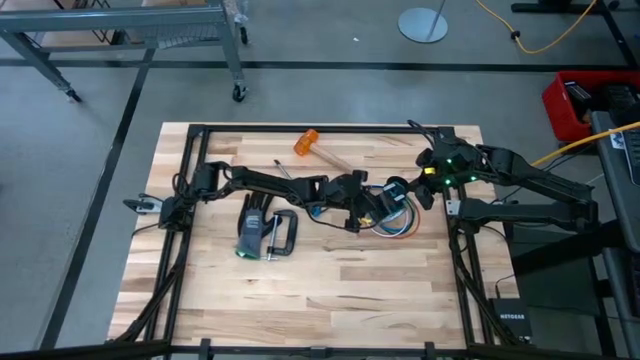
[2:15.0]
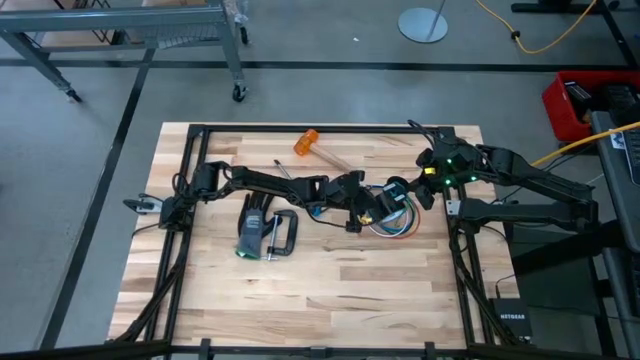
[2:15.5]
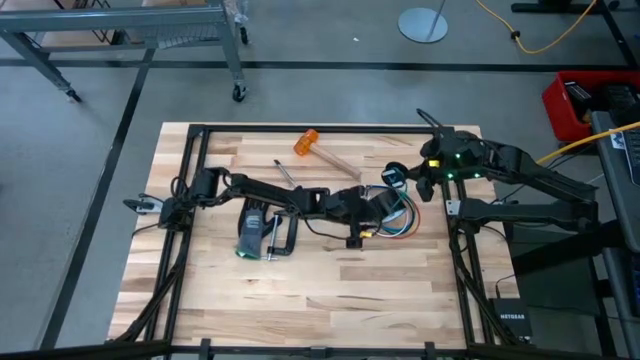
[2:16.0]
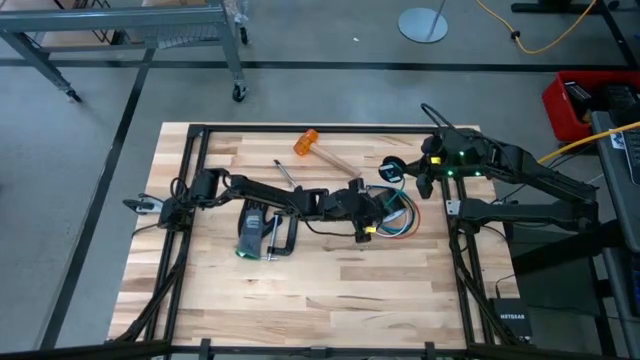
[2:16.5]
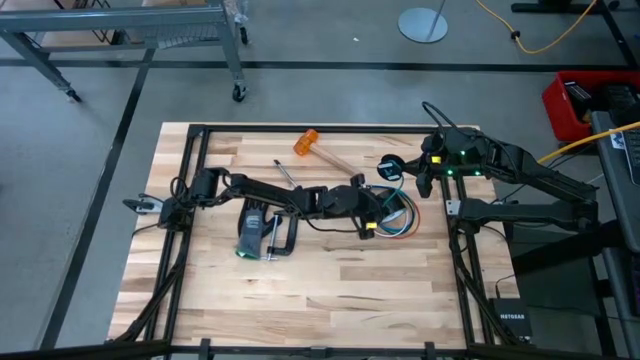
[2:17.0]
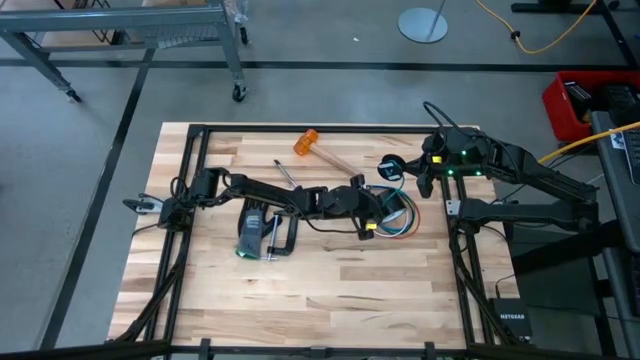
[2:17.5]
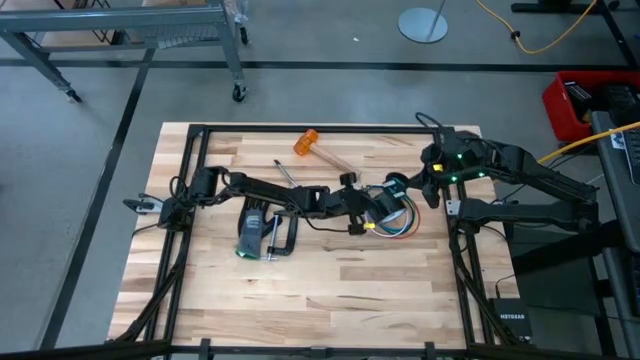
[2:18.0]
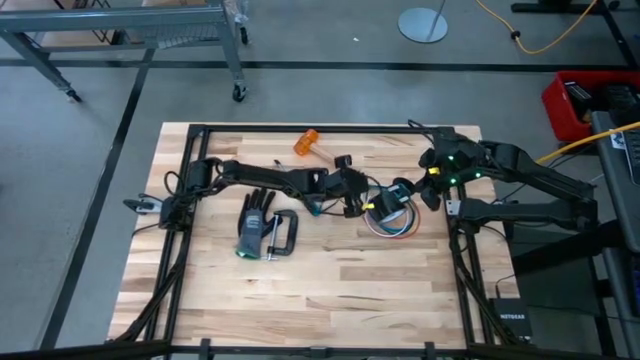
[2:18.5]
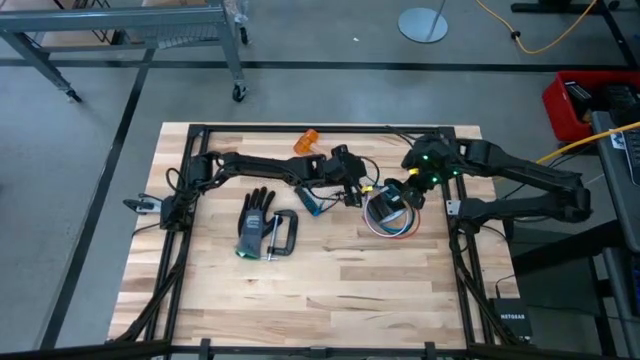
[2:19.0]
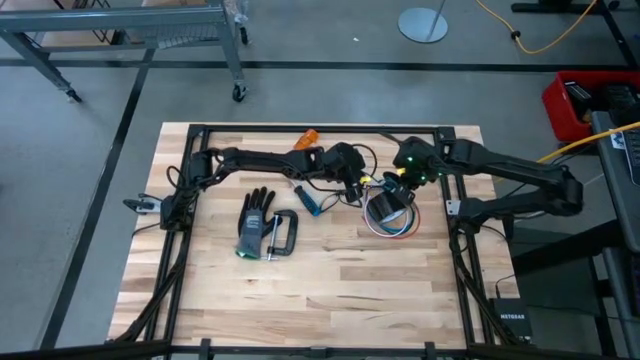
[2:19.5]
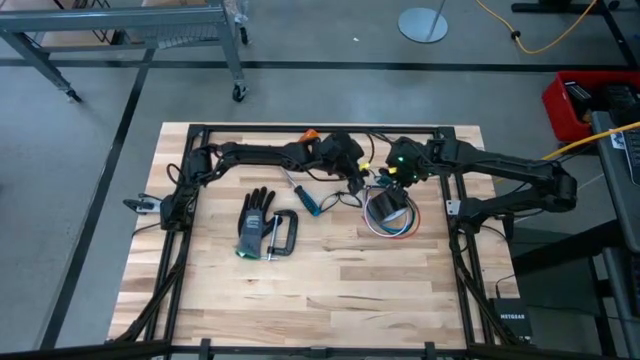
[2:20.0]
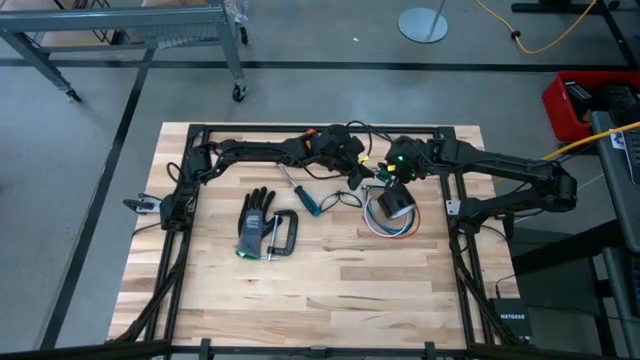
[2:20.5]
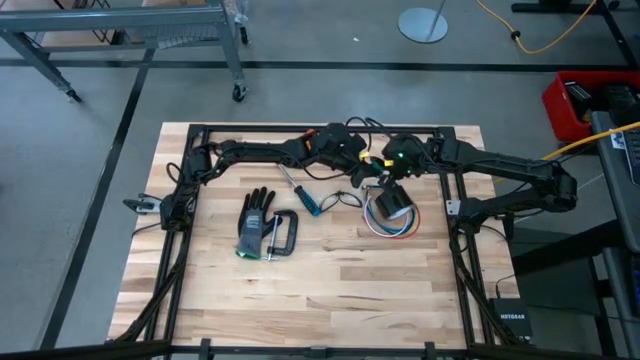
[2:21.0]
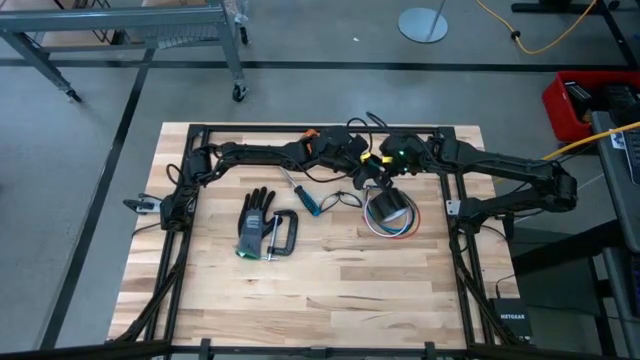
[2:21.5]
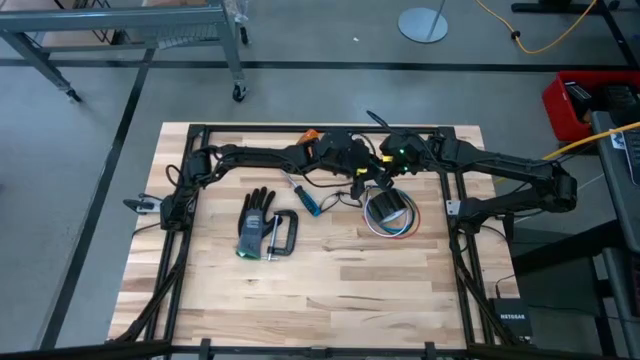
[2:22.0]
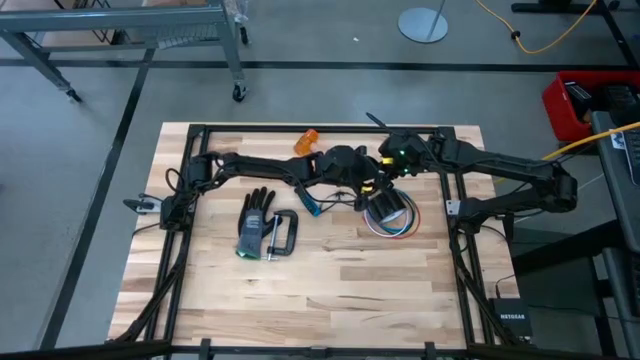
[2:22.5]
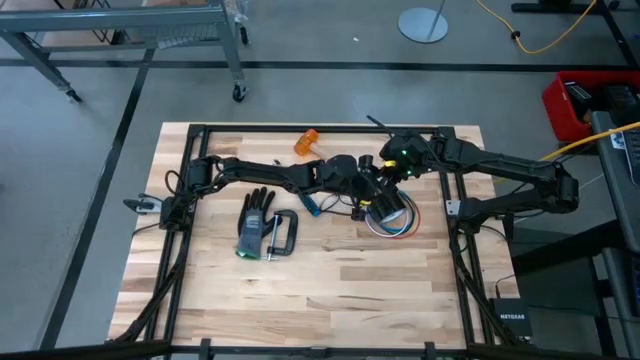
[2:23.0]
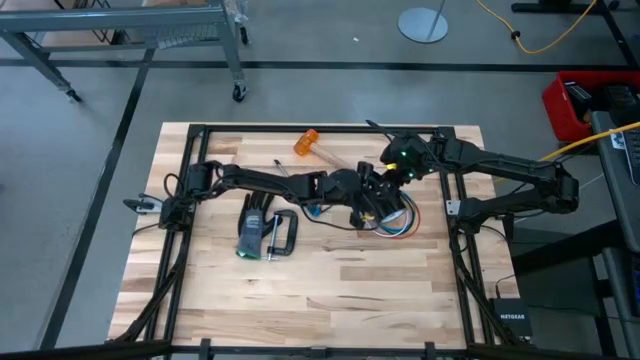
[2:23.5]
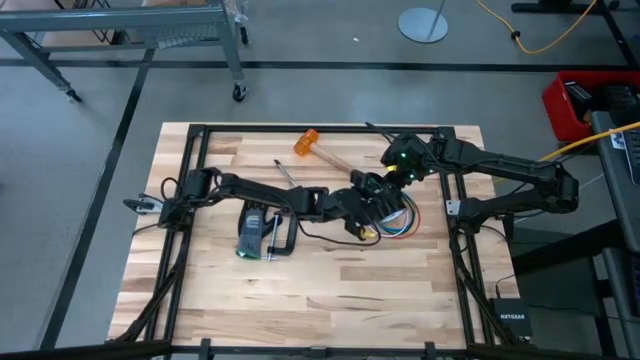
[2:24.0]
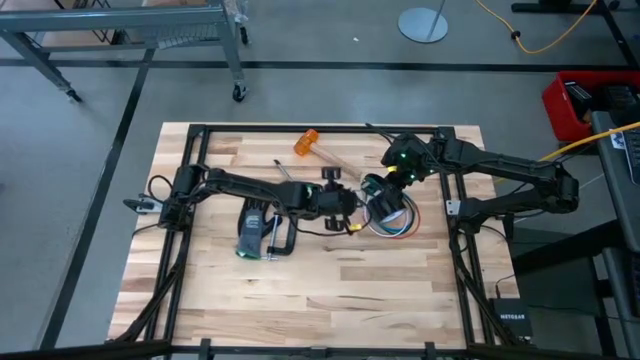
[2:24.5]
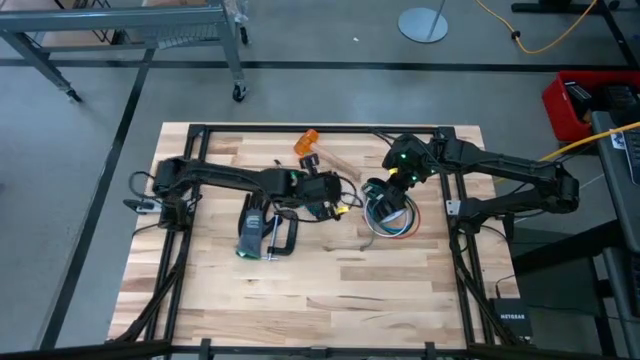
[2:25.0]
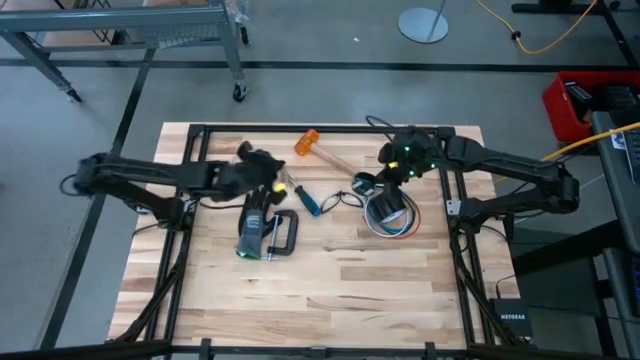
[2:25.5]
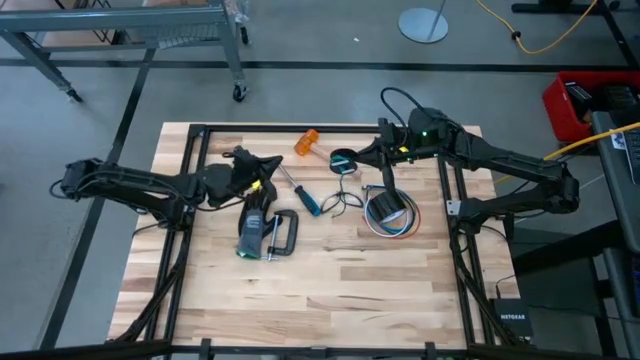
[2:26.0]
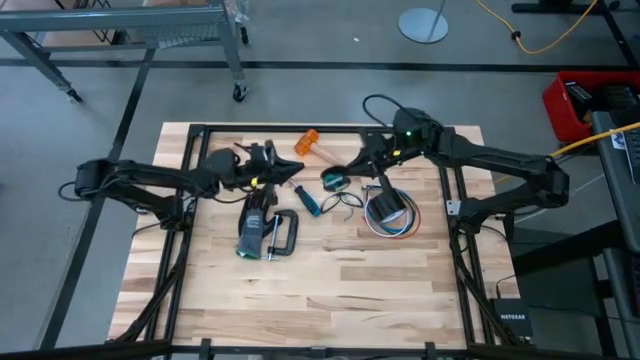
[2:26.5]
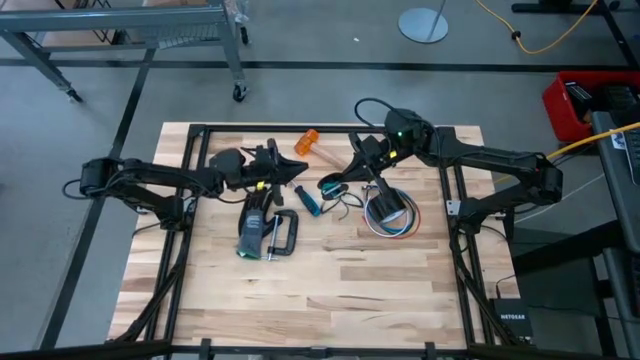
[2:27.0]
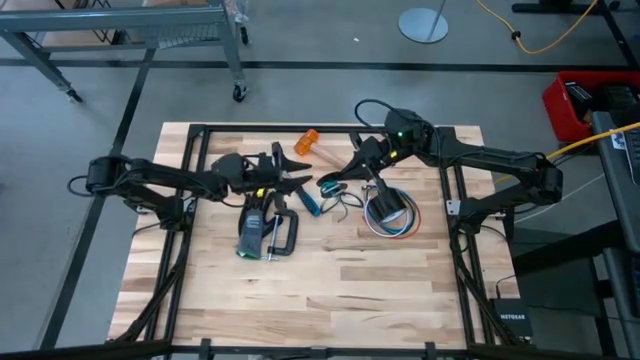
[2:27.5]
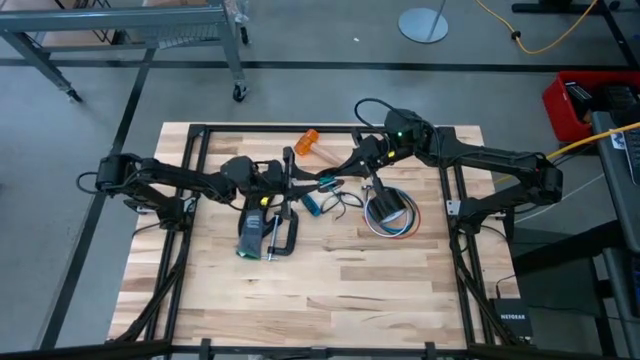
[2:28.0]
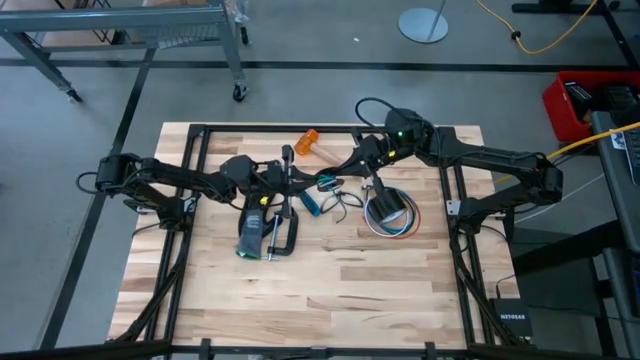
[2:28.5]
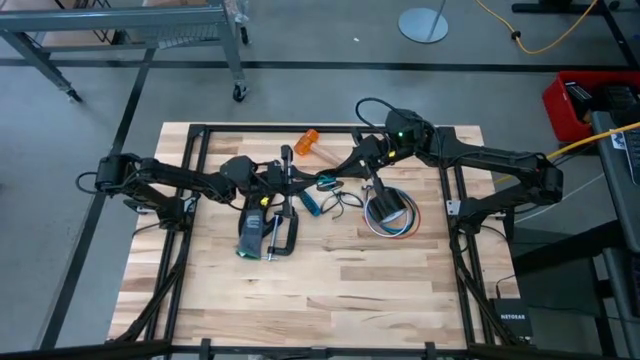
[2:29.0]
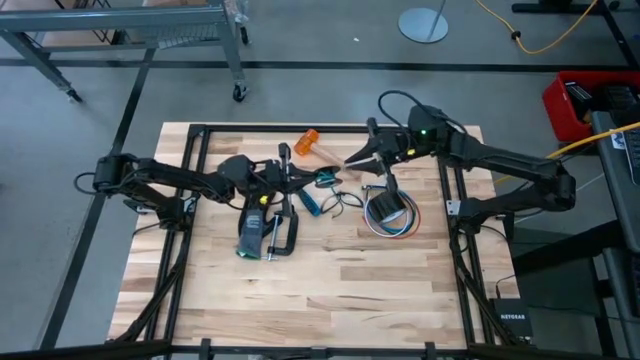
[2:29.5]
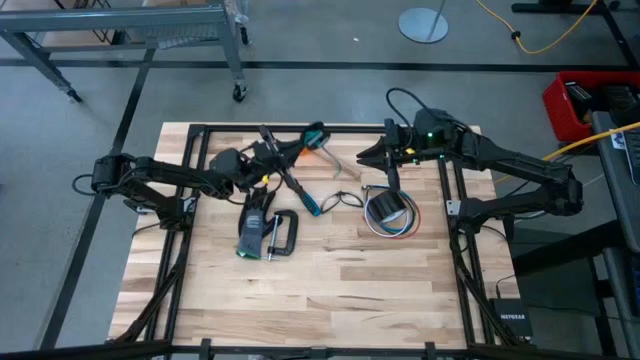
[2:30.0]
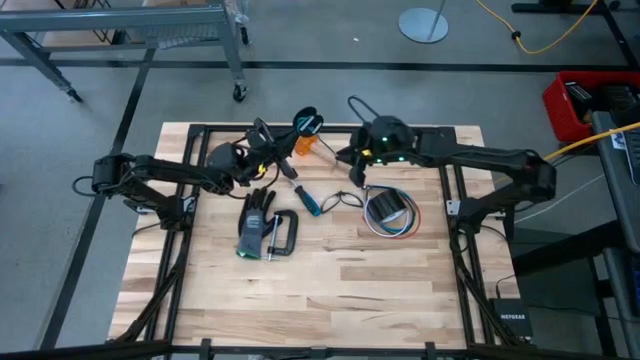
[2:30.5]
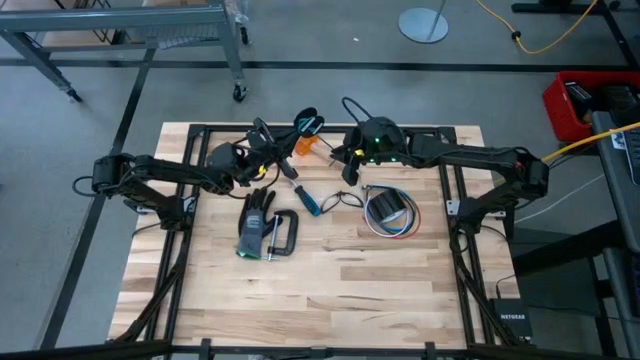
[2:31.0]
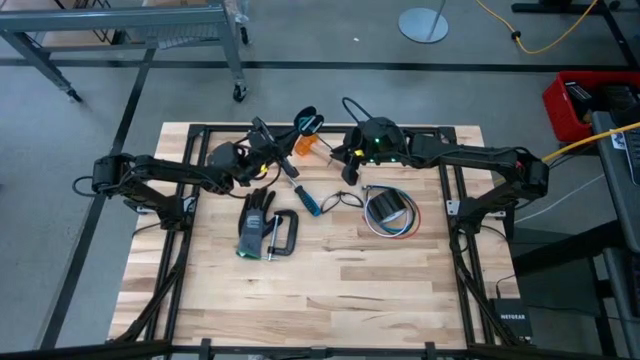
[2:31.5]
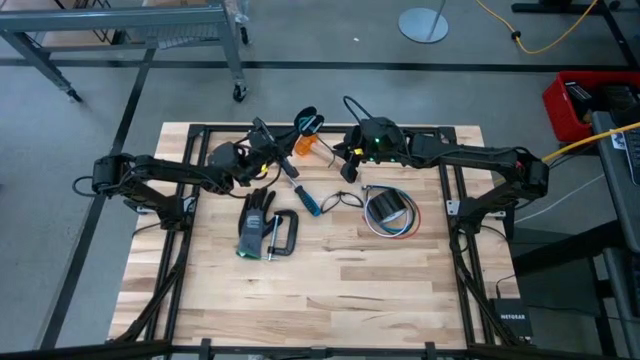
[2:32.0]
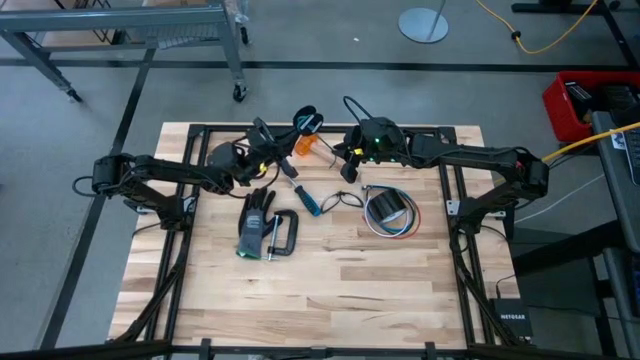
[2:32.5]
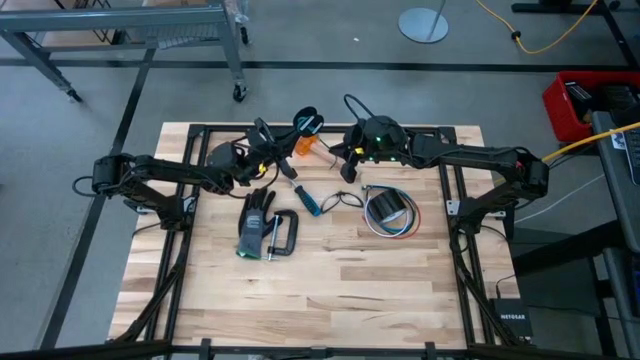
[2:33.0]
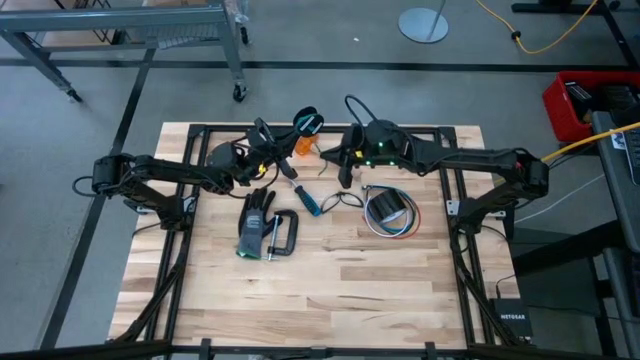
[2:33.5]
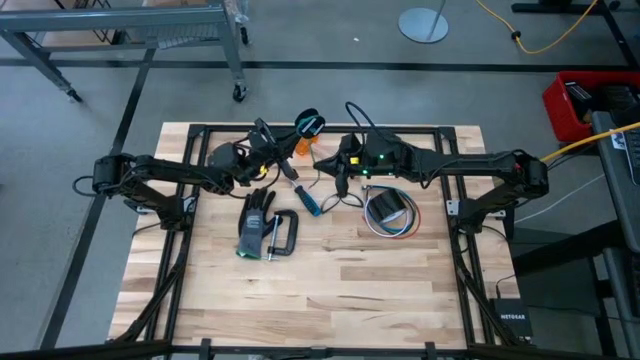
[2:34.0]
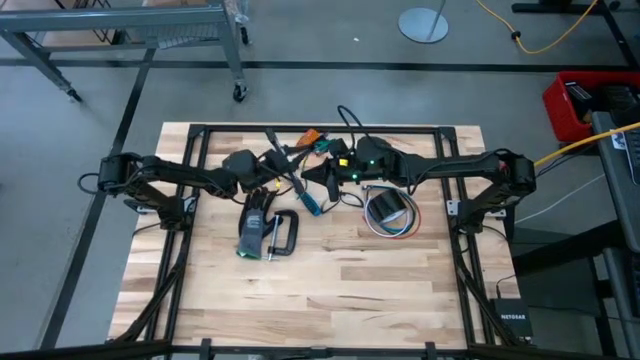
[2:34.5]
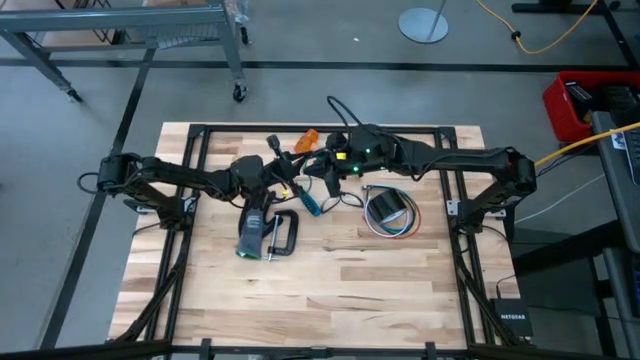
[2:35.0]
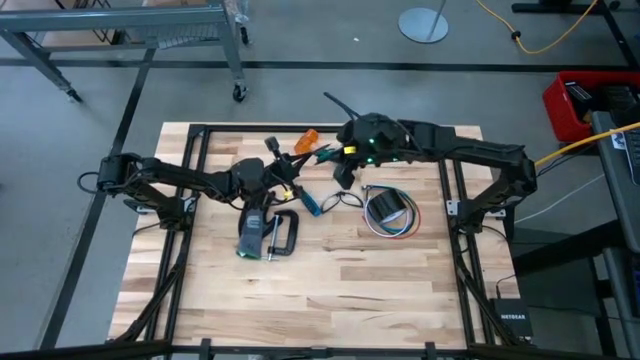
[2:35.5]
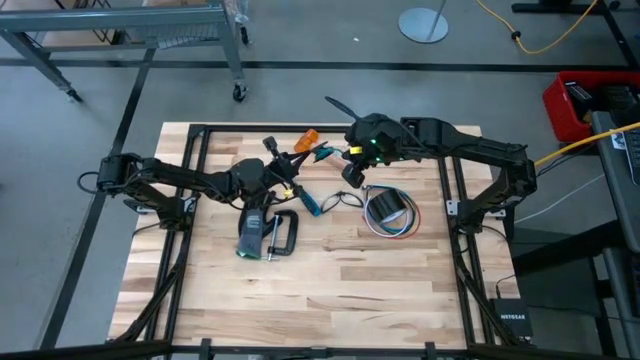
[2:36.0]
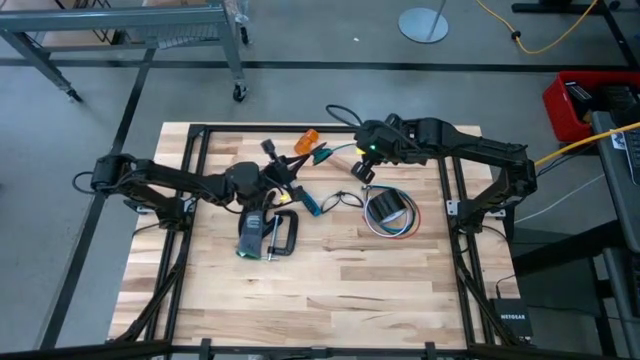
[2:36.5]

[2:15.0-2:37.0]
Task: Coil cords
Coil the green wire onto the spool
